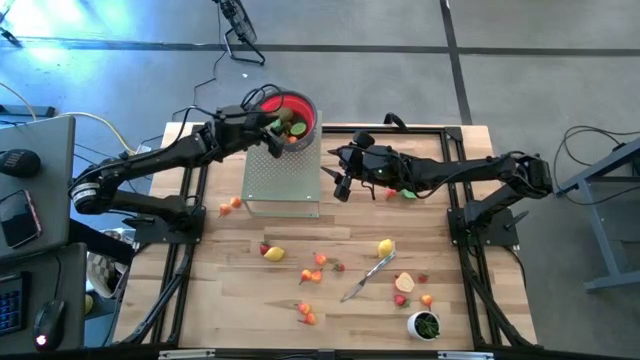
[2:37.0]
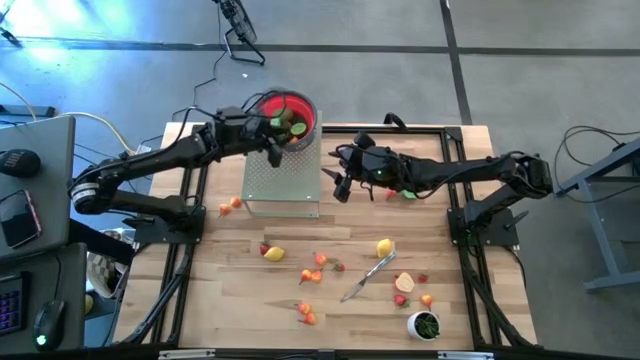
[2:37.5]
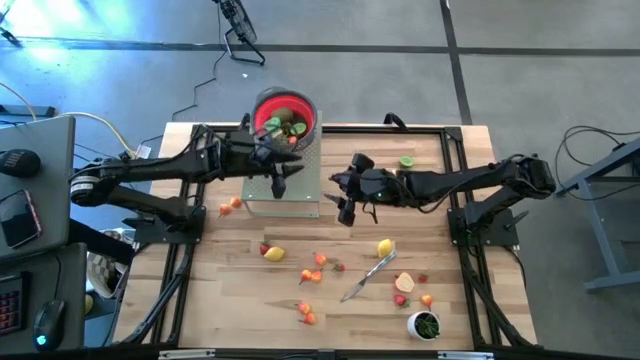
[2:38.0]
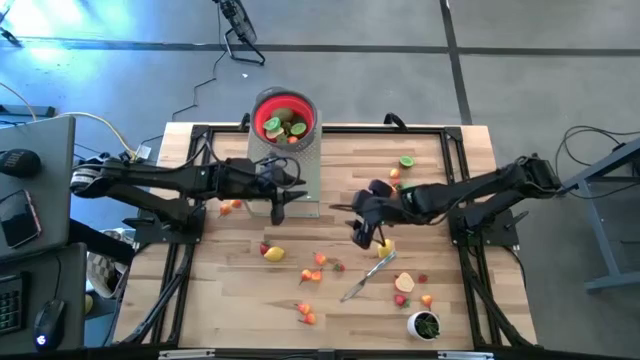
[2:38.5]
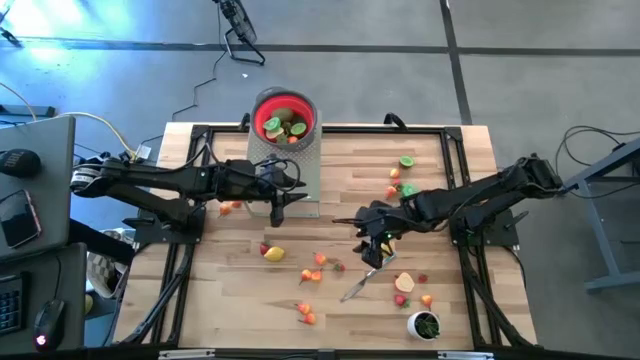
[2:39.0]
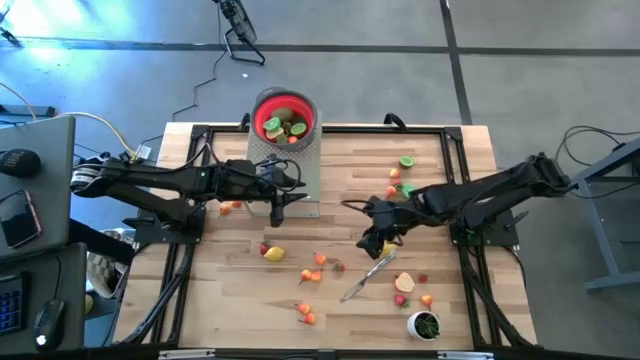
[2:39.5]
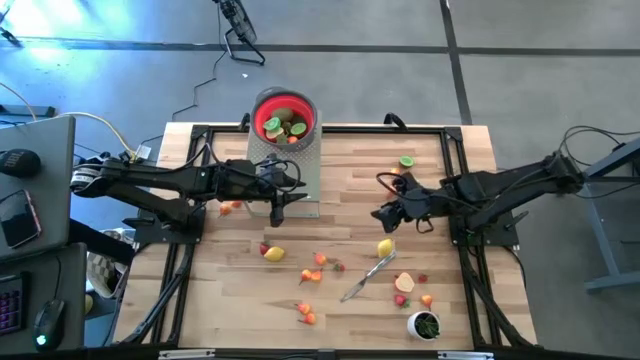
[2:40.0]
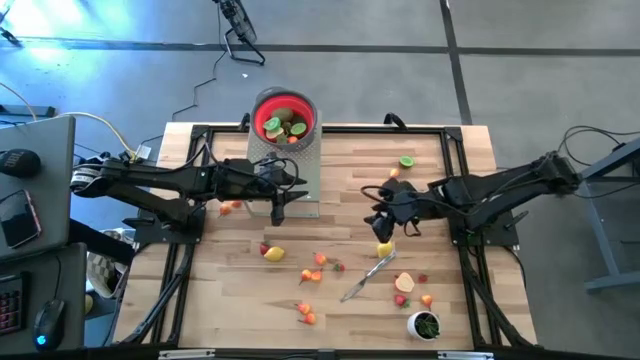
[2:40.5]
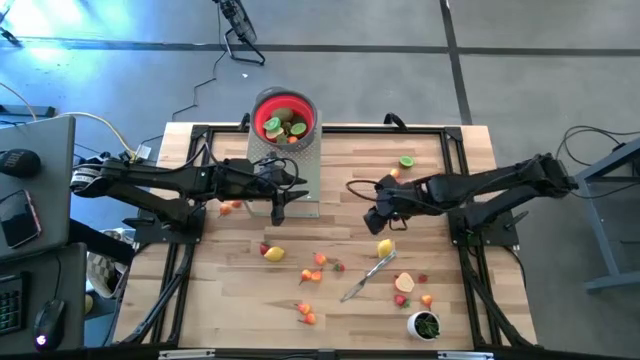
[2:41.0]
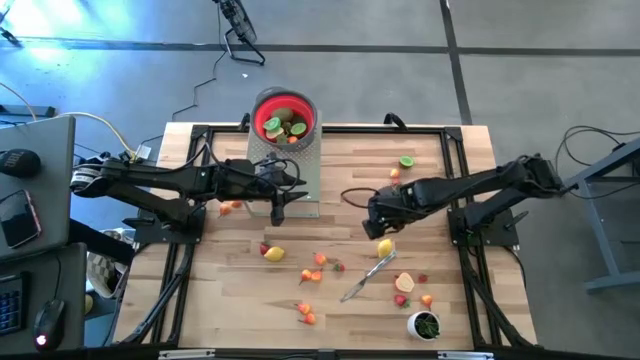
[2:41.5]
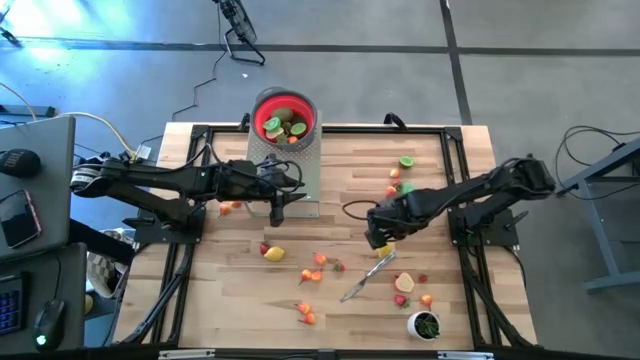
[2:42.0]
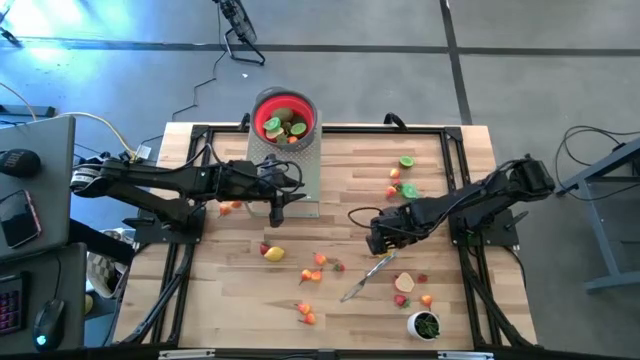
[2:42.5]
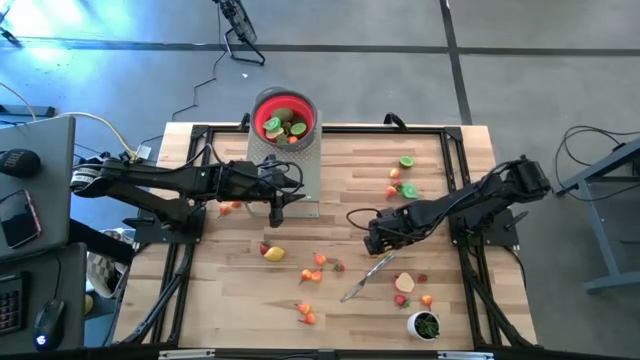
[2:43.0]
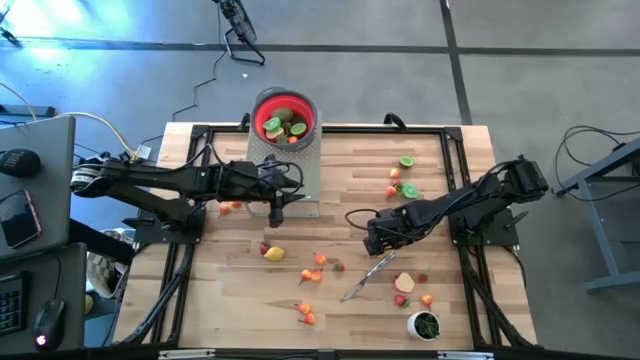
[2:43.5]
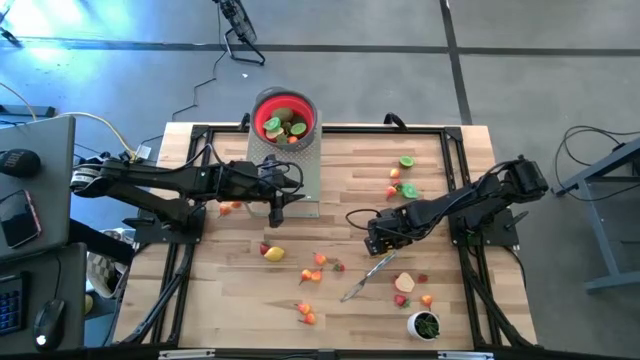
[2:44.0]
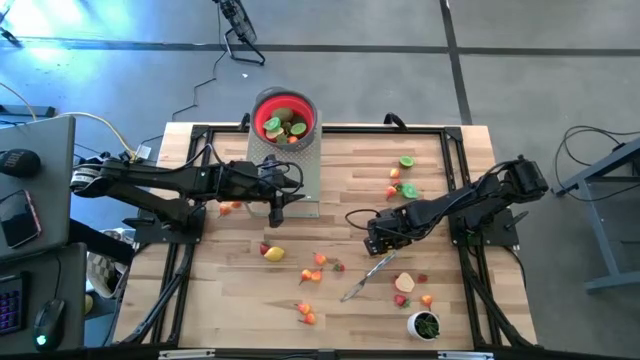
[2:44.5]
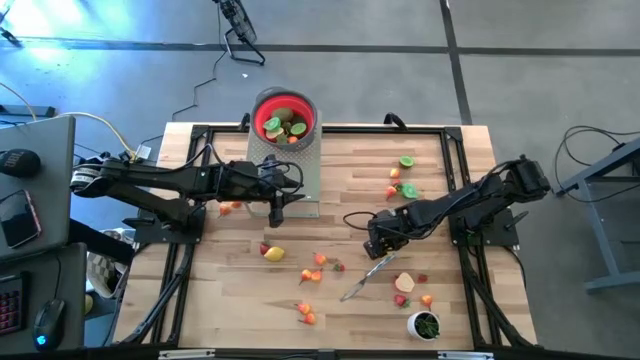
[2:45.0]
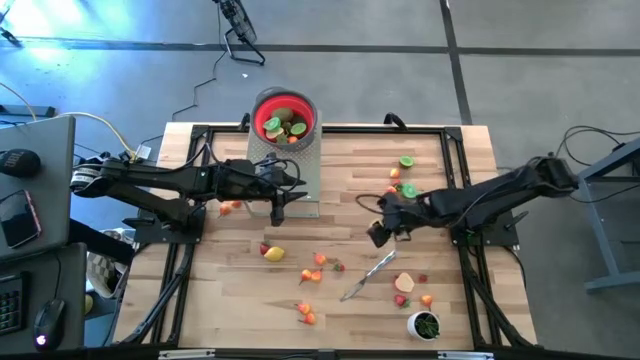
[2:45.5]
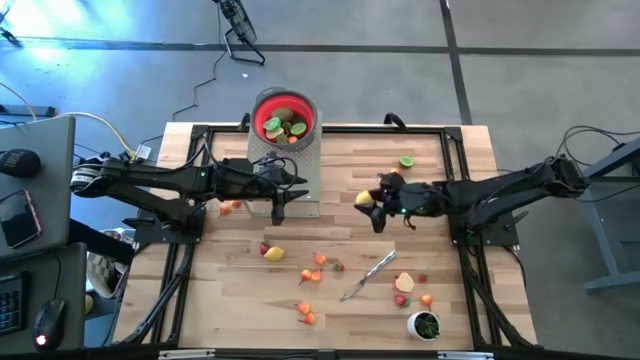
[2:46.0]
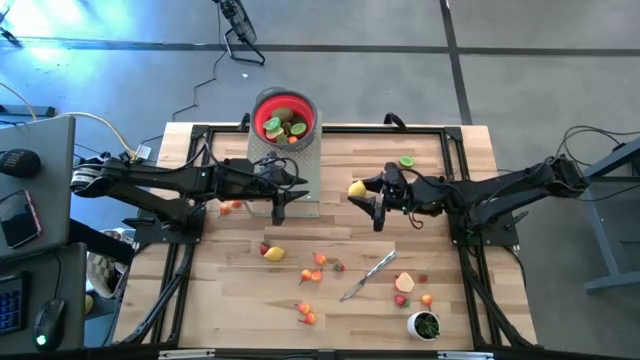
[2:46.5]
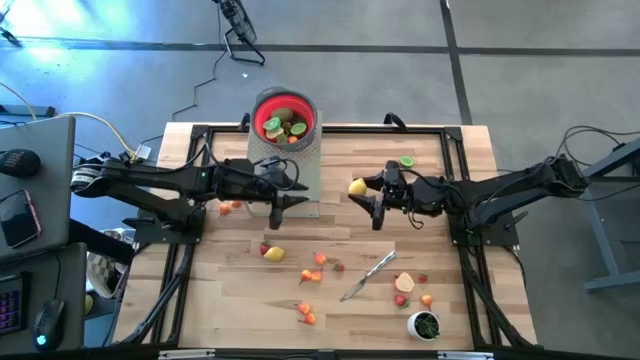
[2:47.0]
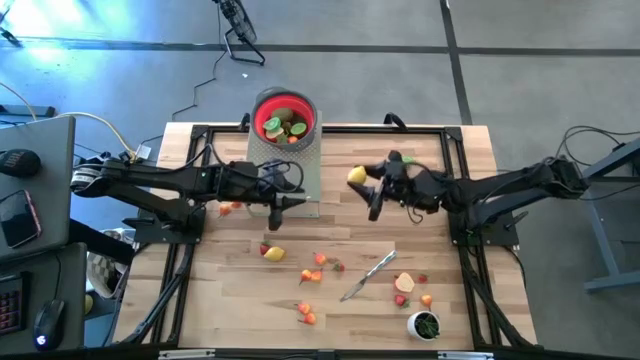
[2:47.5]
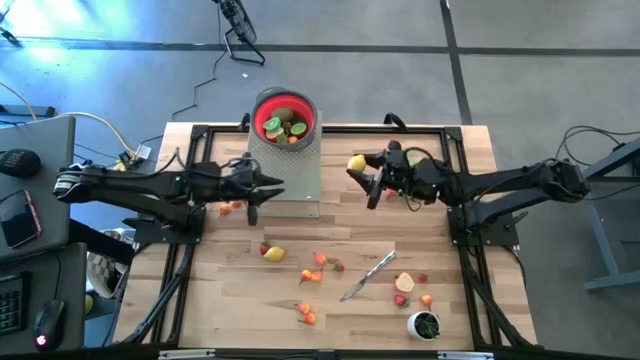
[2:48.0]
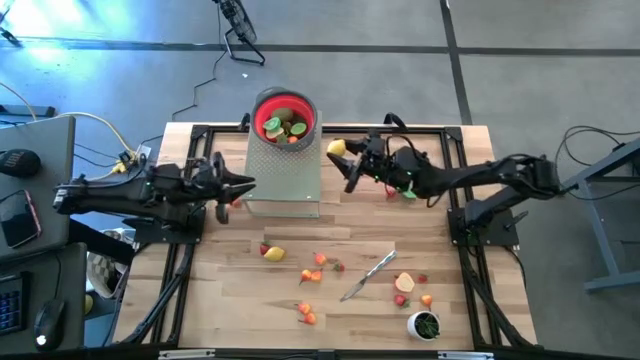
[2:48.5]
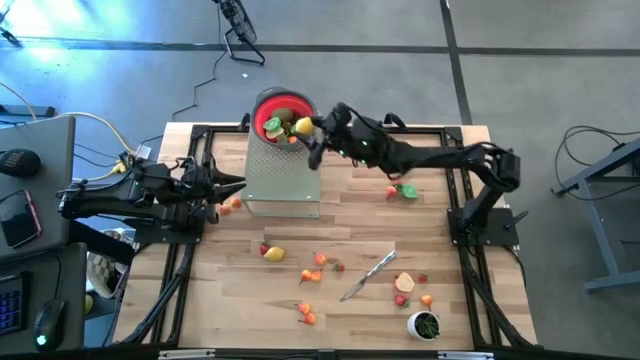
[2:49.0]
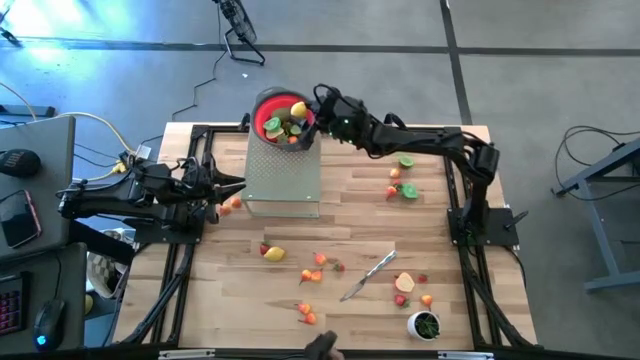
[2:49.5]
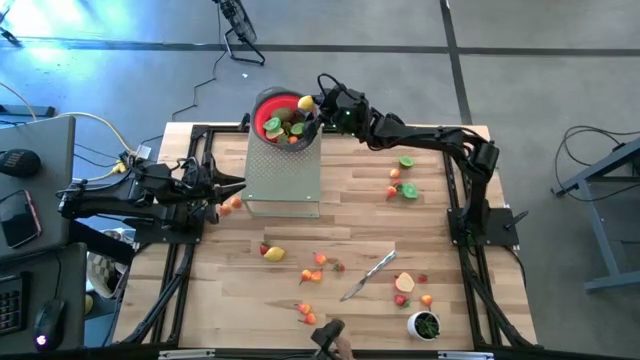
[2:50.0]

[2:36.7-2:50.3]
Task: Pick & Place Fruit
Put the lemon into the red strainer on the shelf

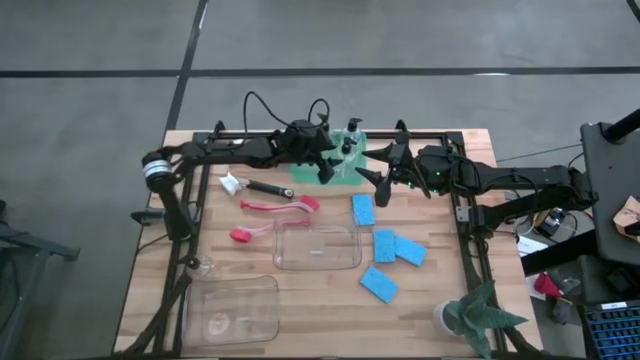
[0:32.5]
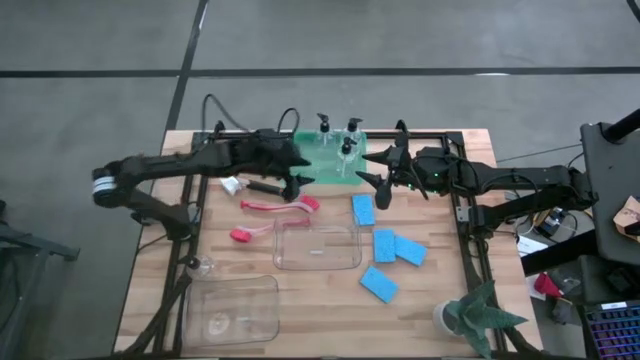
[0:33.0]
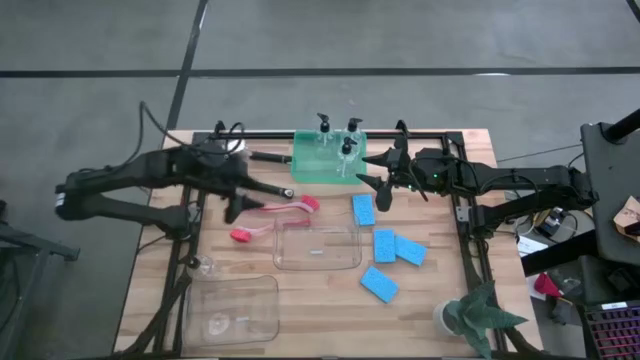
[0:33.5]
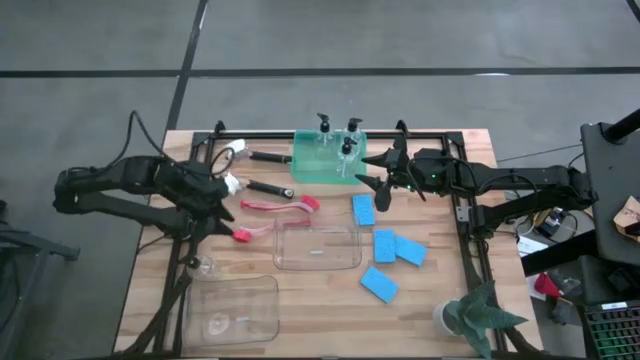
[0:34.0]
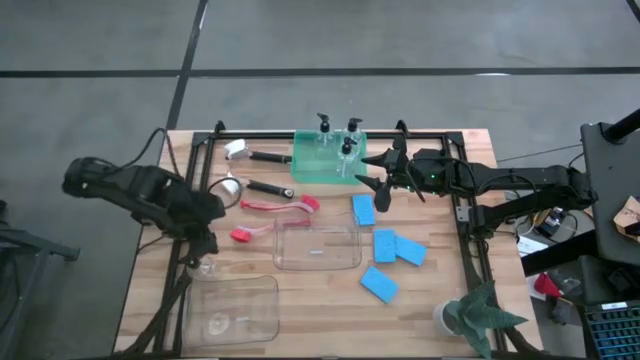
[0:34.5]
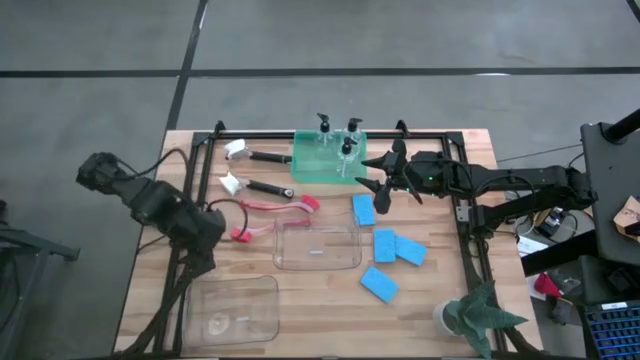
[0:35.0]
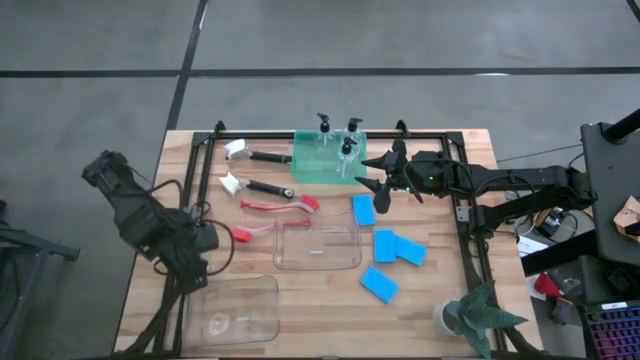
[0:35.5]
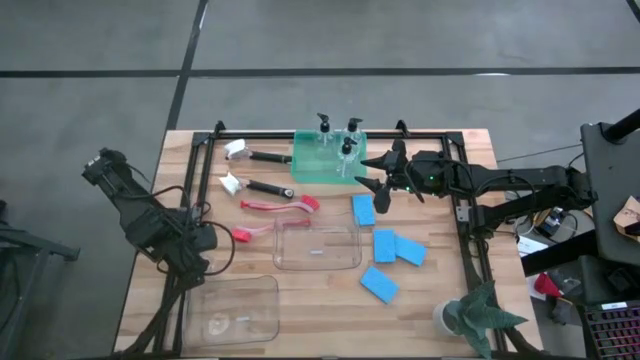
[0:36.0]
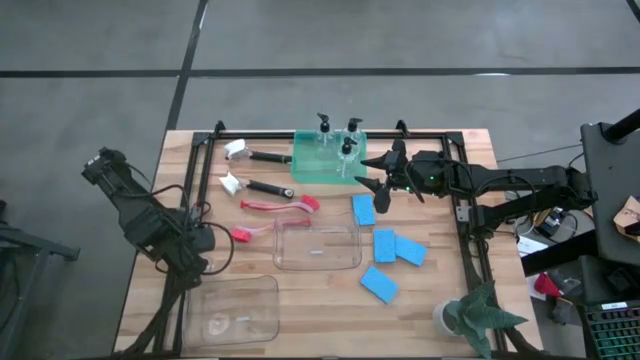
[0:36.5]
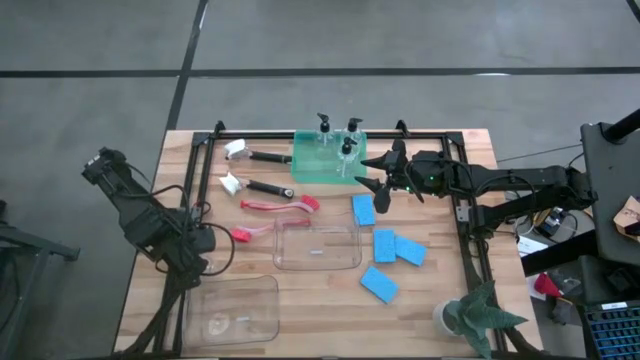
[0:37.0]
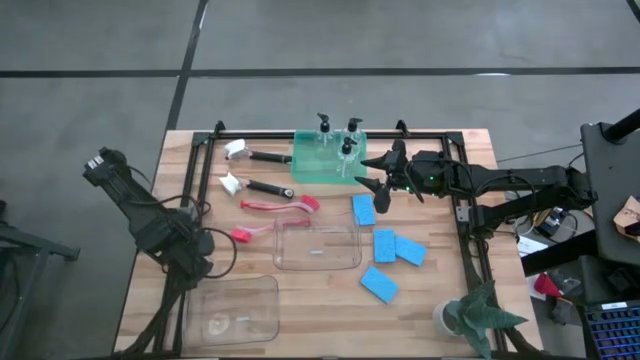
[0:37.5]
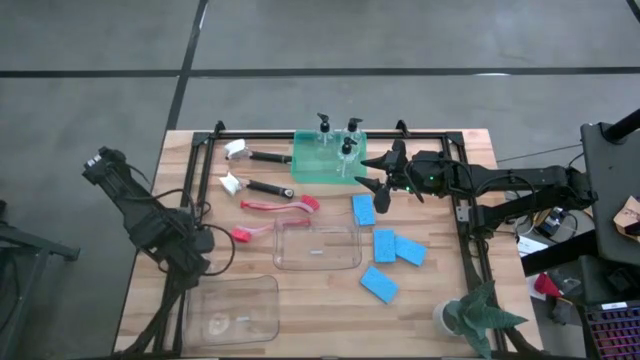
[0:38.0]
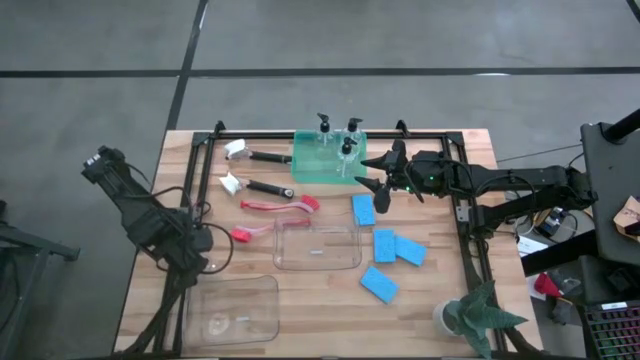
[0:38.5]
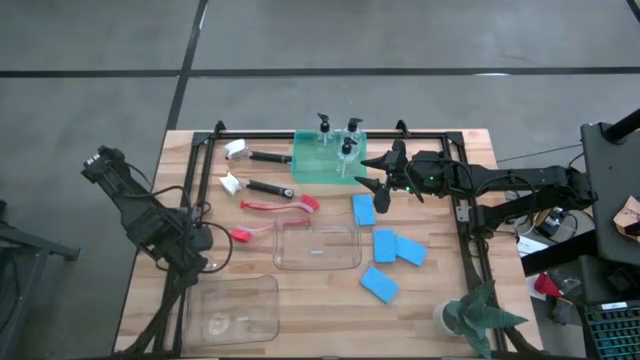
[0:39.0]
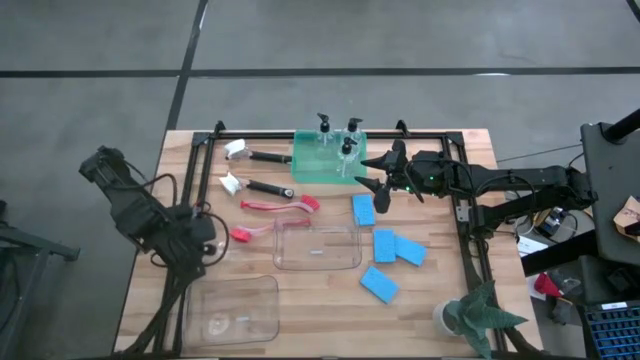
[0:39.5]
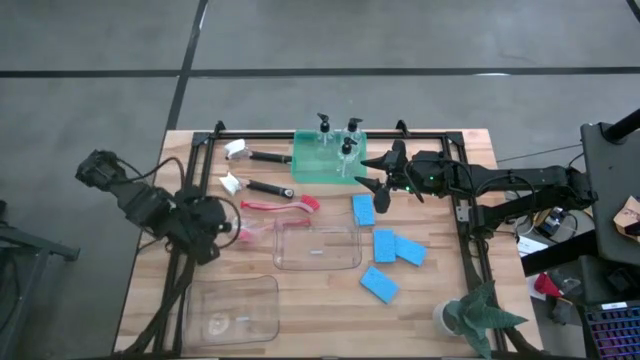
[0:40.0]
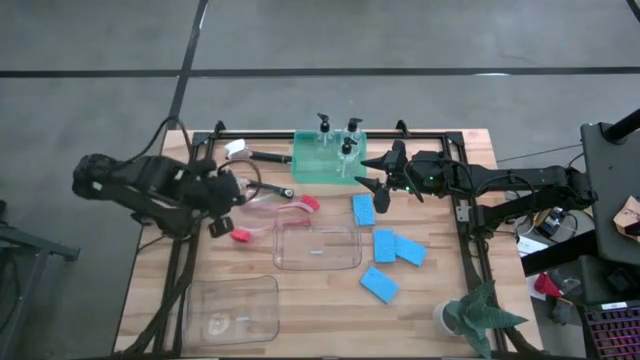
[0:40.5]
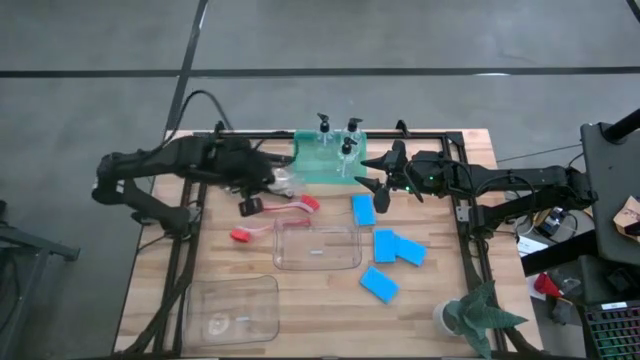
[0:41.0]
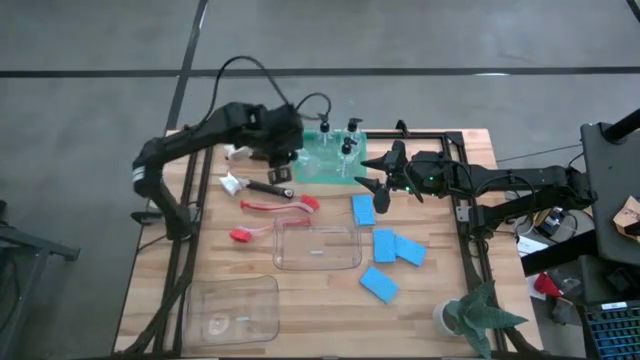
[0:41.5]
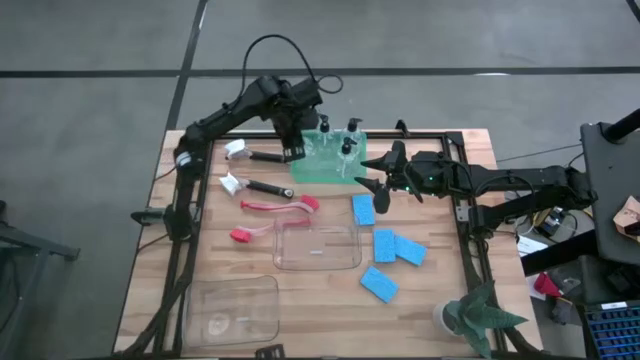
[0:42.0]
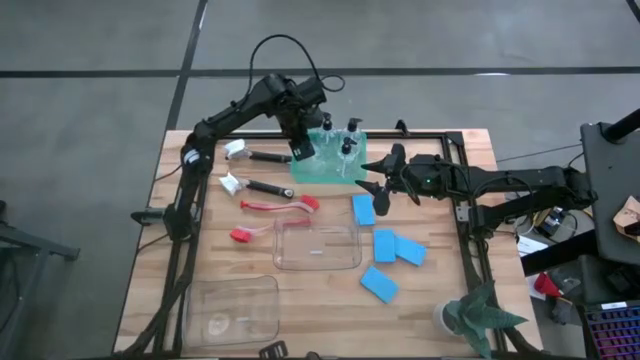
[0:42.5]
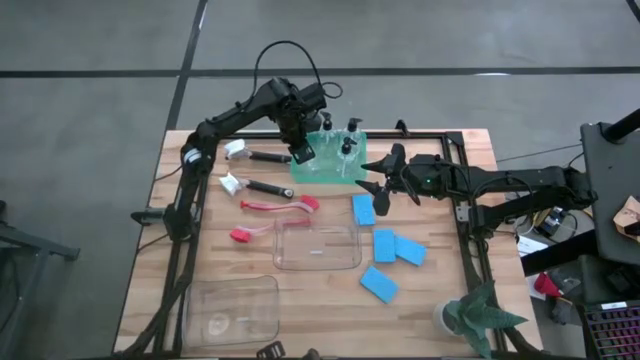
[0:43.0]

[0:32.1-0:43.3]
Task: Pick & Place Kitchen Sink Supplies
Put the transparent soap dispenser into the green bin
